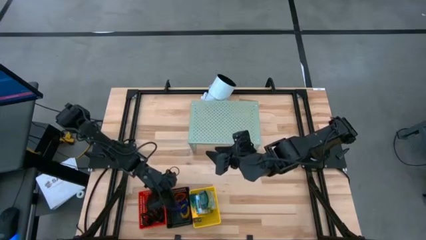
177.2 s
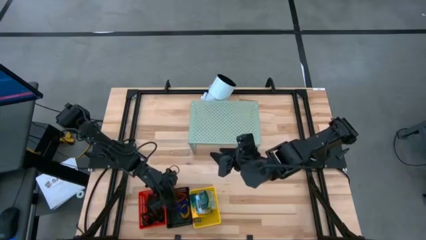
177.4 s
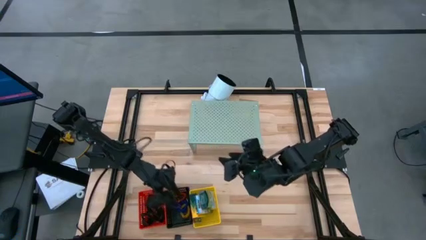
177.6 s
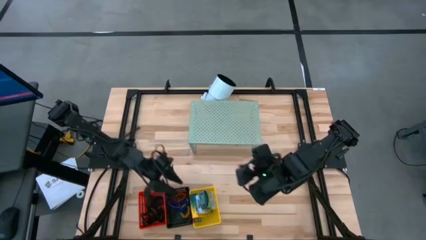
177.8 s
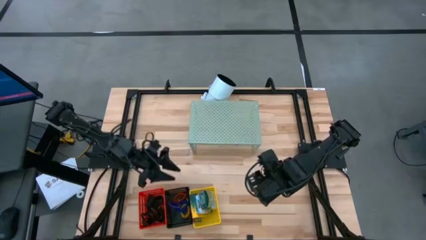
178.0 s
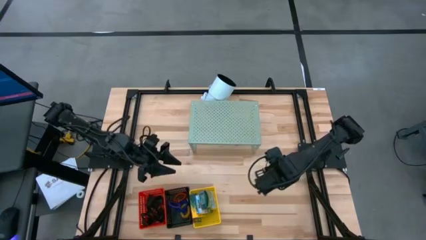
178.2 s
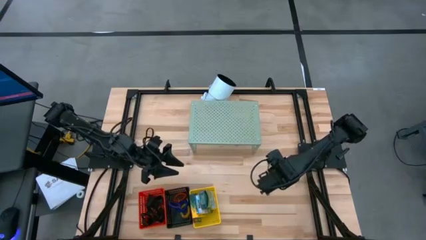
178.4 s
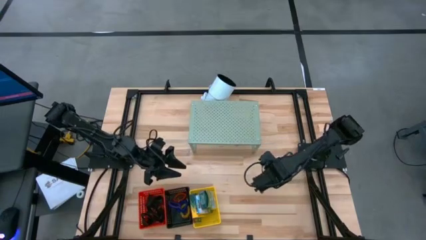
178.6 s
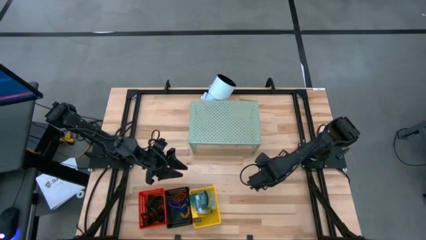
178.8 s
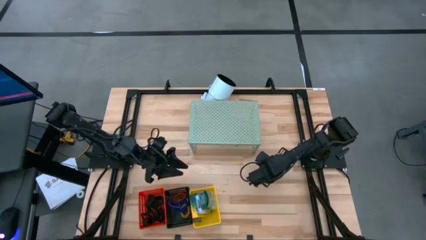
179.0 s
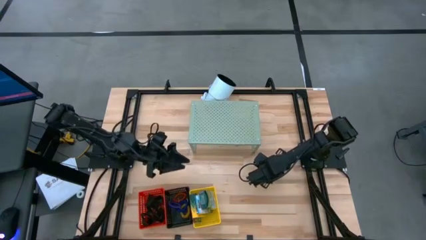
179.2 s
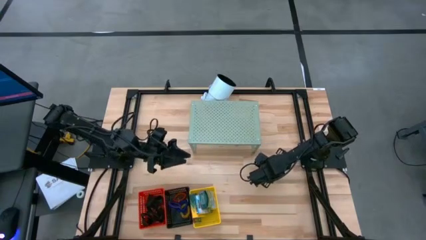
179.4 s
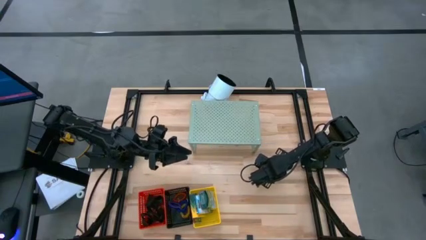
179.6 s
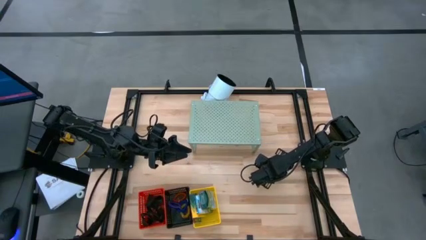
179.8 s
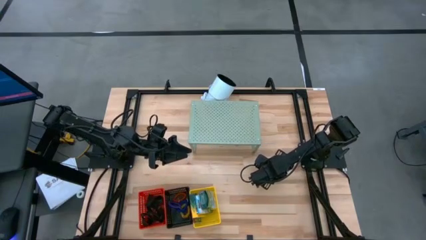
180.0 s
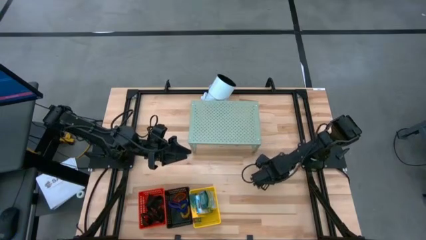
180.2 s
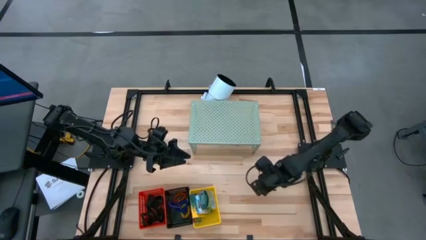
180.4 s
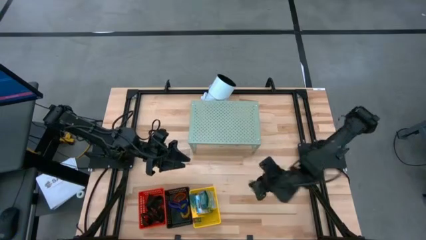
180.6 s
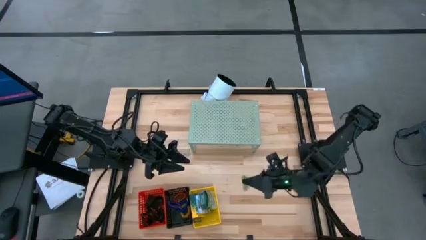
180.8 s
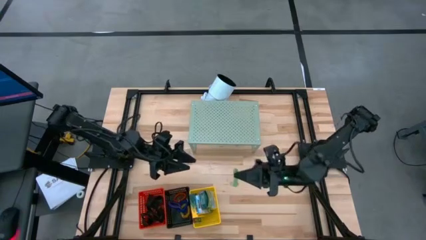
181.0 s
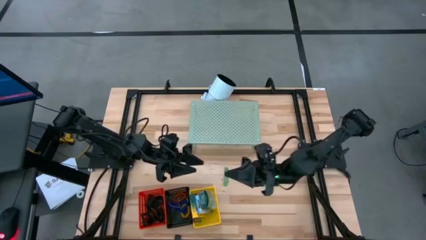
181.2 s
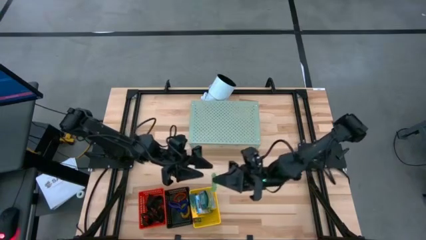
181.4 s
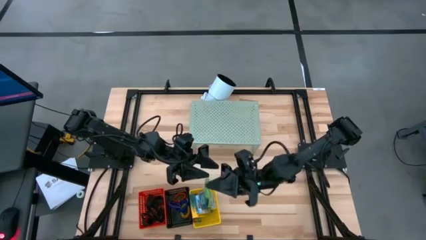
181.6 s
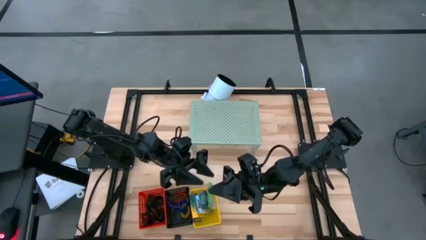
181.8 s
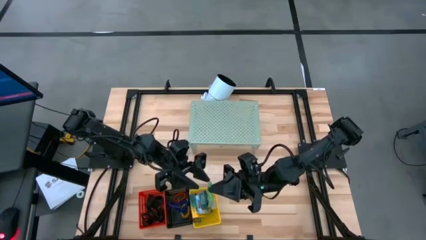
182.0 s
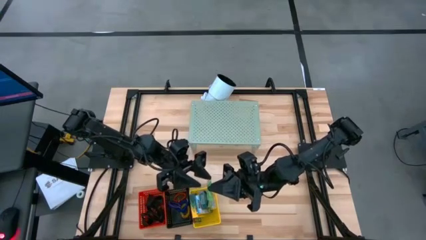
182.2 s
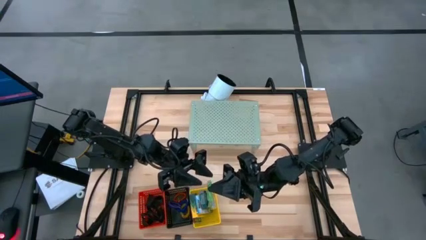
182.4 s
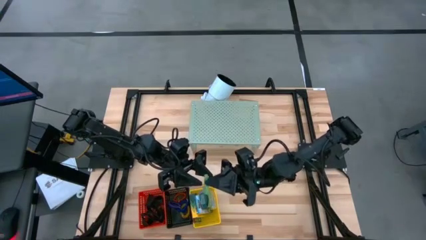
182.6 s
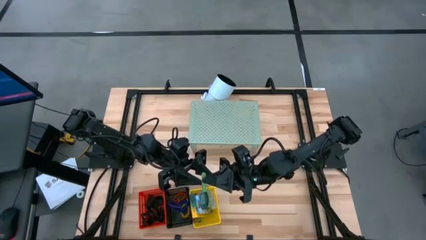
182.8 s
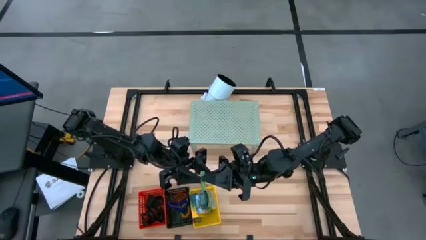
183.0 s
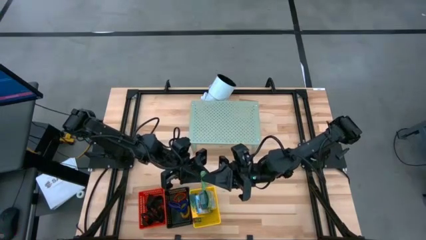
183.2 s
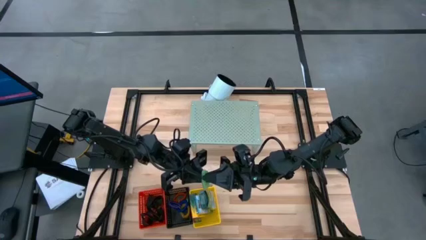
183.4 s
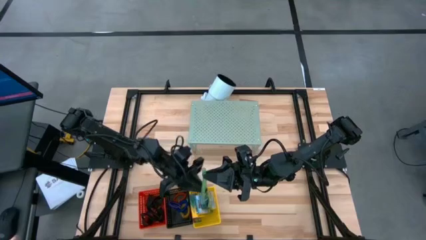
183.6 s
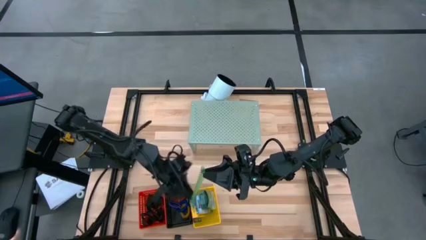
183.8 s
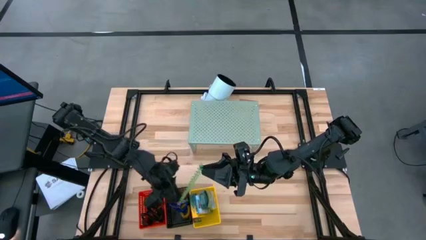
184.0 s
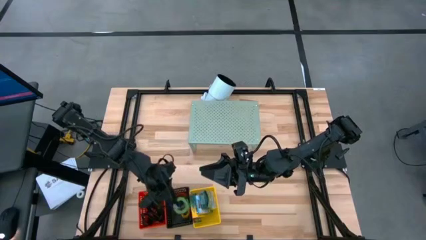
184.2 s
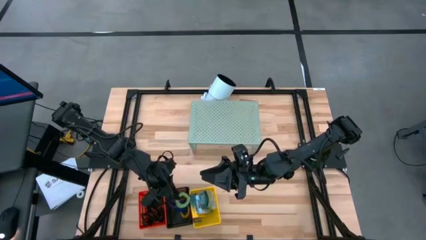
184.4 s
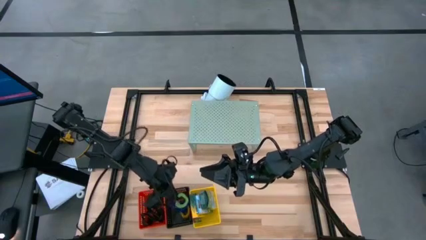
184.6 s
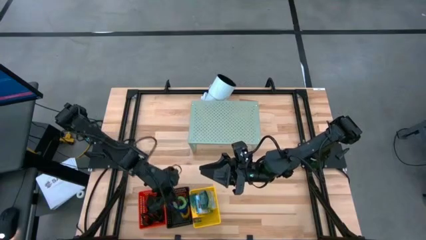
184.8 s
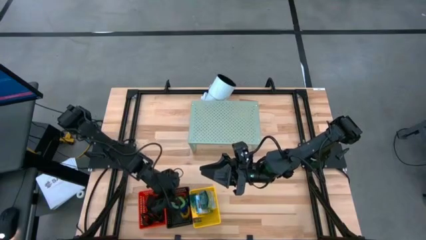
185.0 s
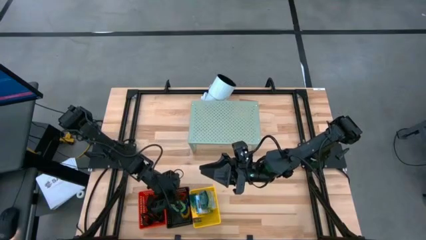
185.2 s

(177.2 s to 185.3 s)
Task: Pick & Place Office Desk Supplies
Put the green spring keychain into the black bin

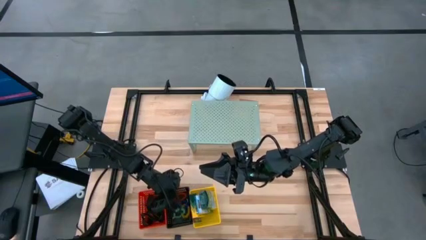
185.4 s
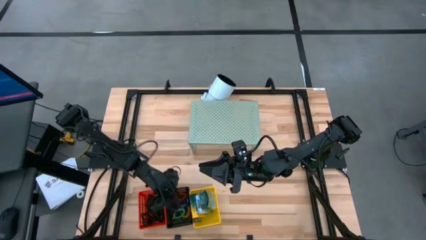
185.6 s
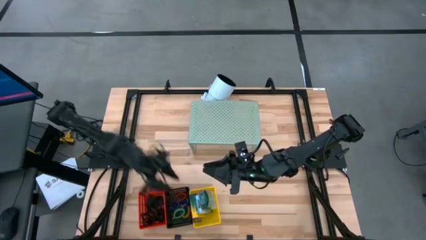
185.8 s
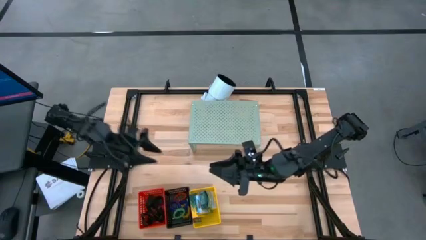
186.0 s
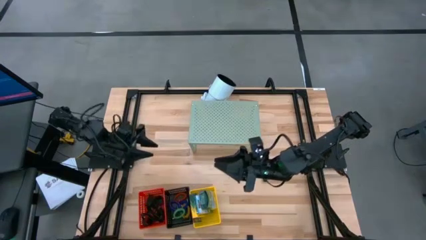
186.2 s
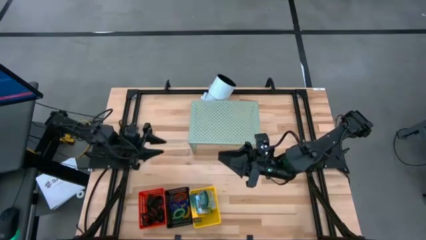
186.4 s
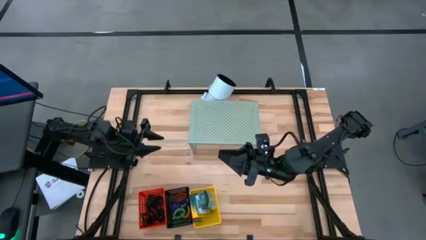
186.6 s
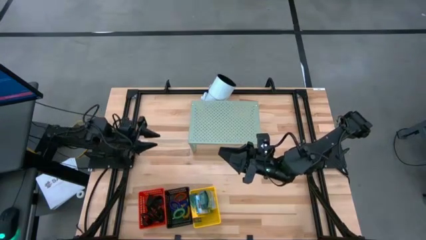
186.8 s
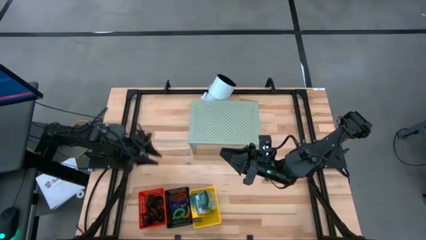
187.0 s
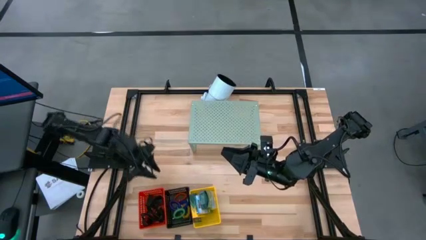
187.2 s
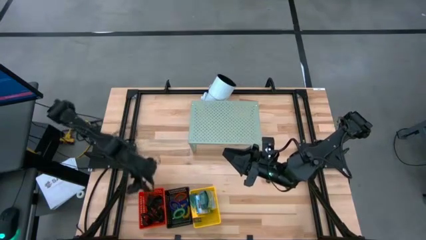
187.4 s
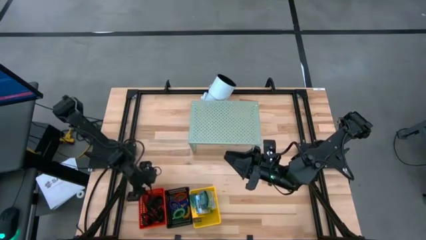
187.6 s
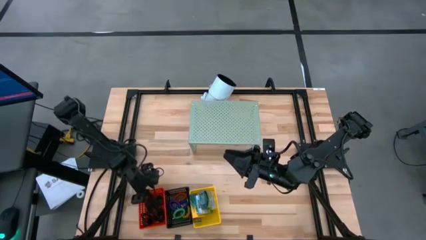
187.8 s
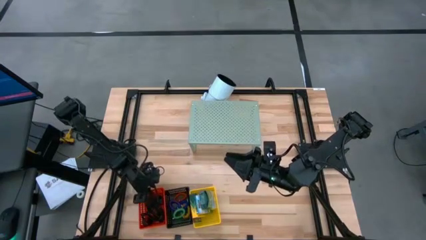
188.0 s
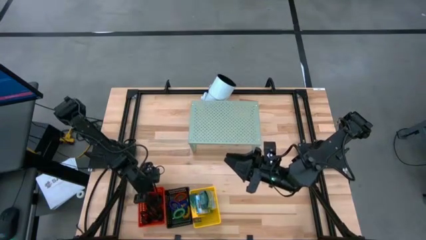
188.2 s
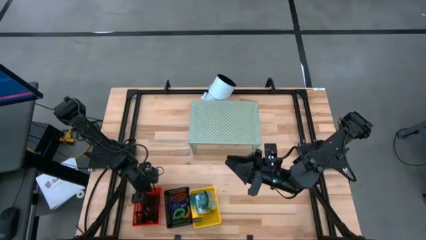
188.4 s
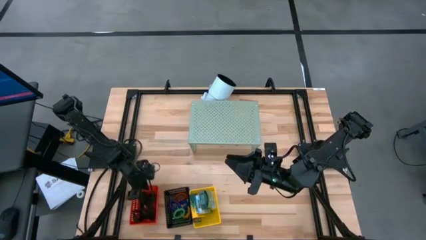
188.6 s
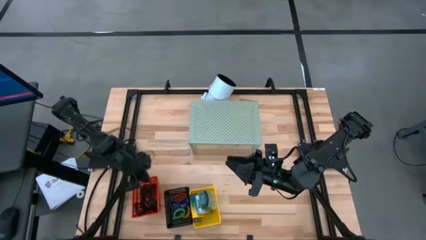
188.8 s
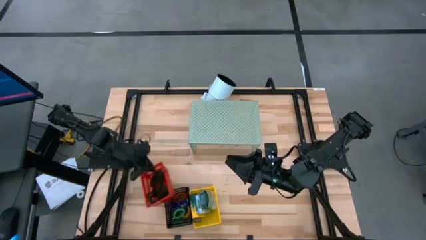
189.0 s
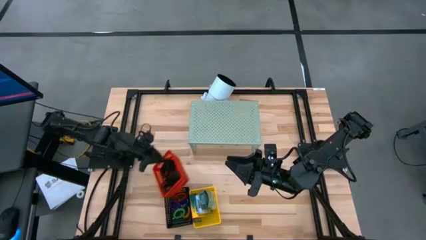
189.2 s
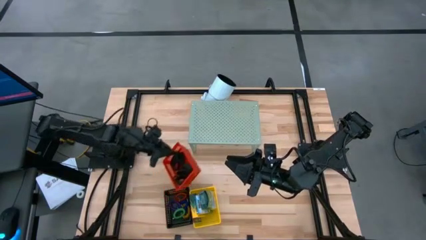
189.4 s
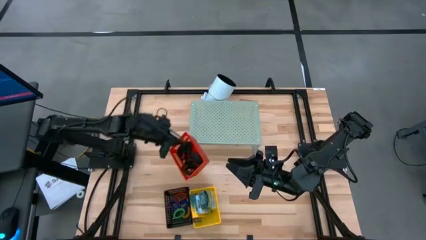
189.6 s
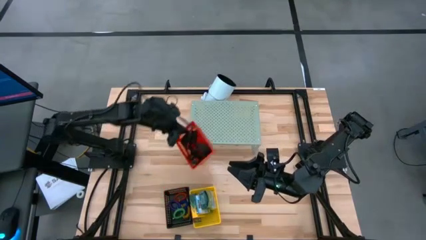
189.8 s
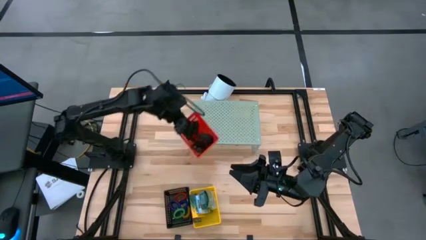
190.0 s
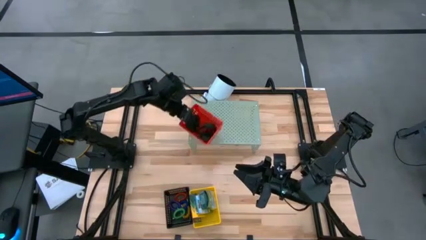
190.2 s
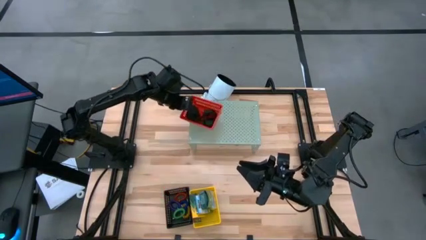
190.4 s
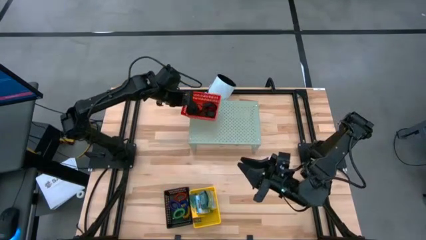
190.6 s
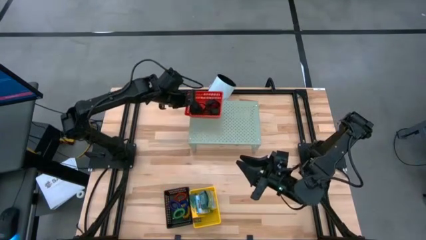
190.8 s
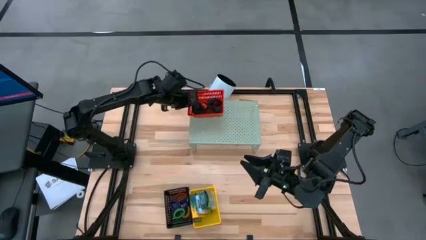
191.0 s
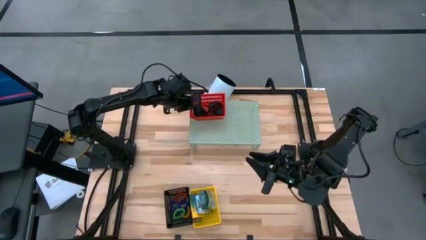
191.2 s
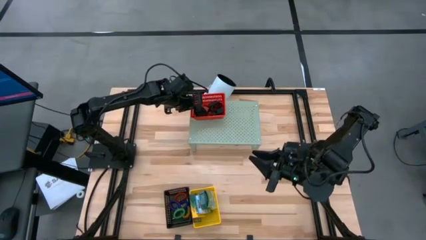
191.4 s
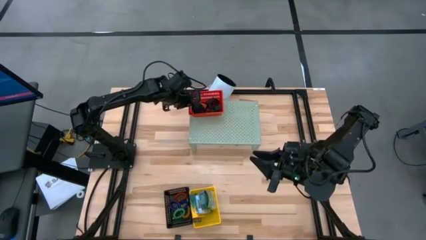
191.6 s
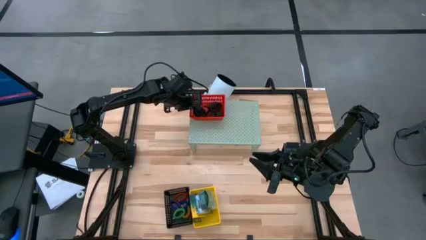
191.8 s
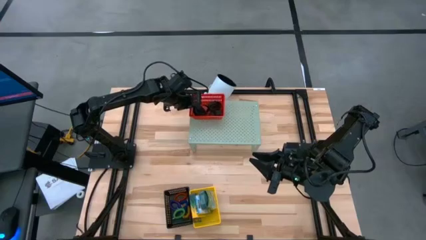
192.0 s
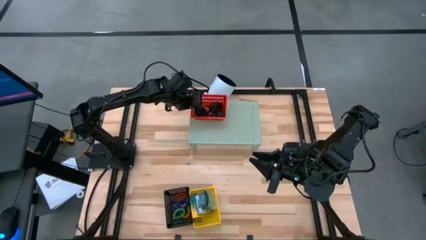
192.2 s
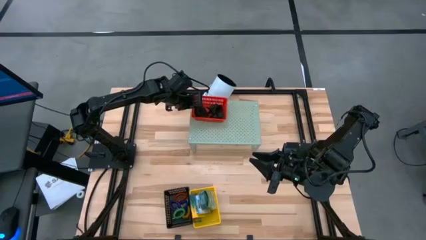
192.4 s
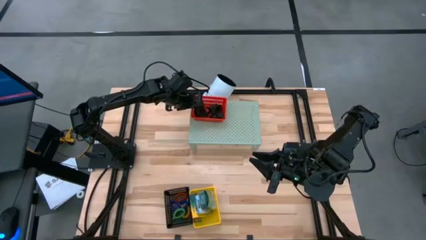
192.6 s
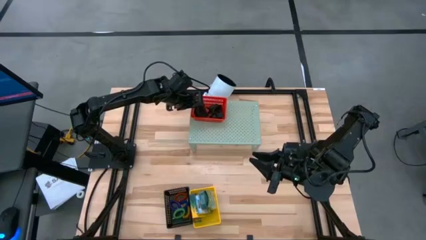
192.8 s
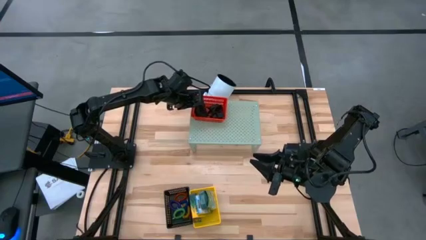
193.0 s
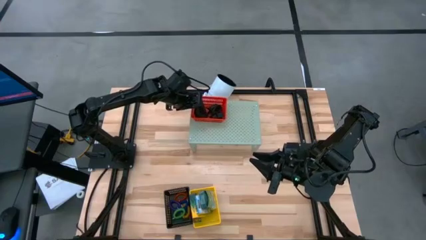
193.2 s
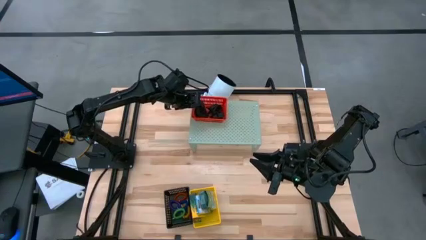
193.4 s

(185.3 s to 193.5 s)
Put the red bin on the shelf
